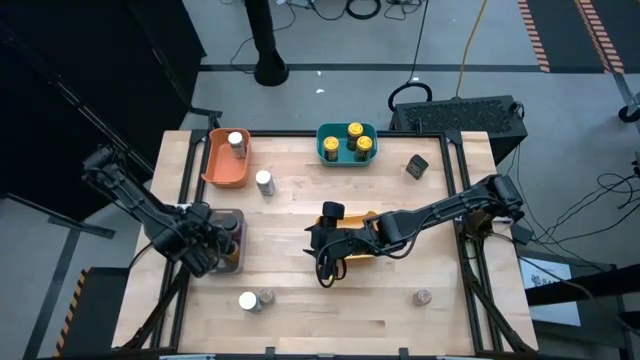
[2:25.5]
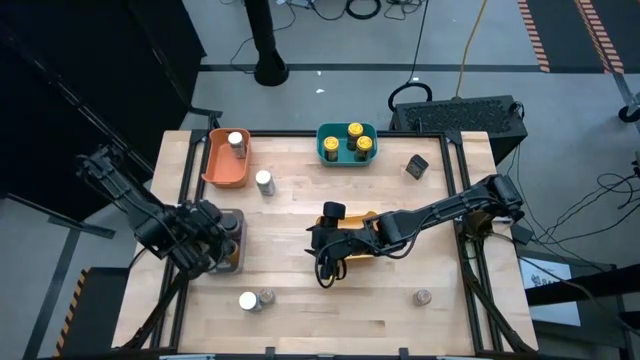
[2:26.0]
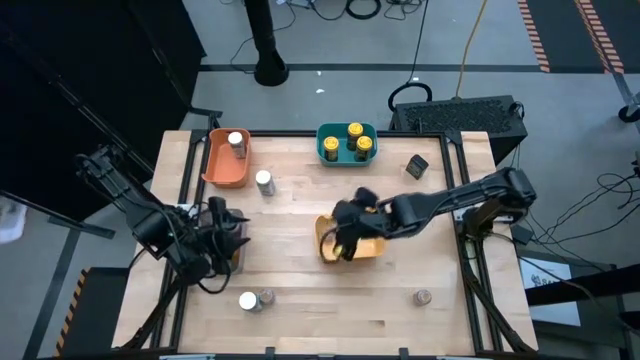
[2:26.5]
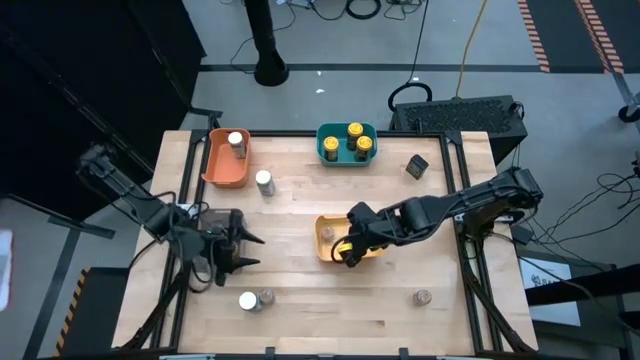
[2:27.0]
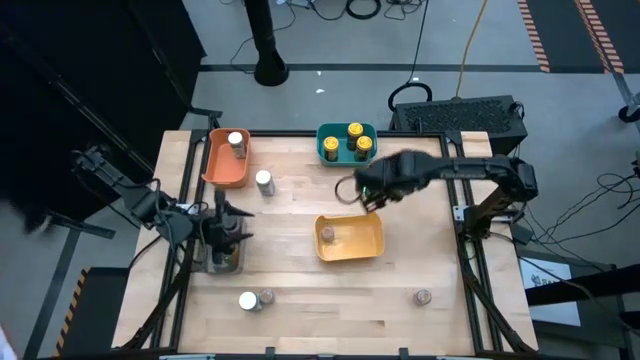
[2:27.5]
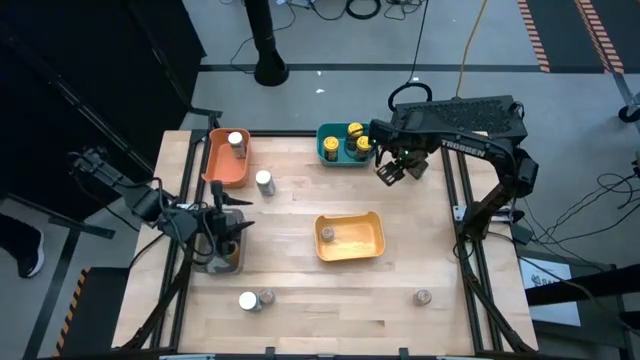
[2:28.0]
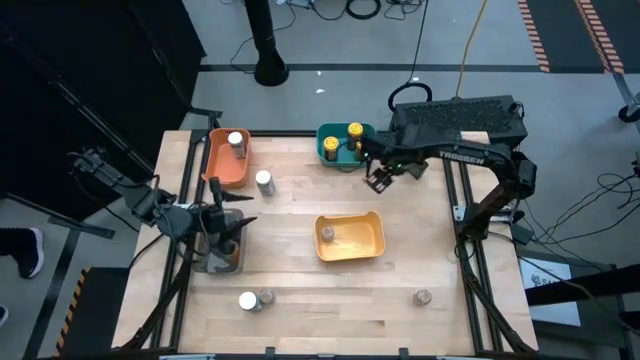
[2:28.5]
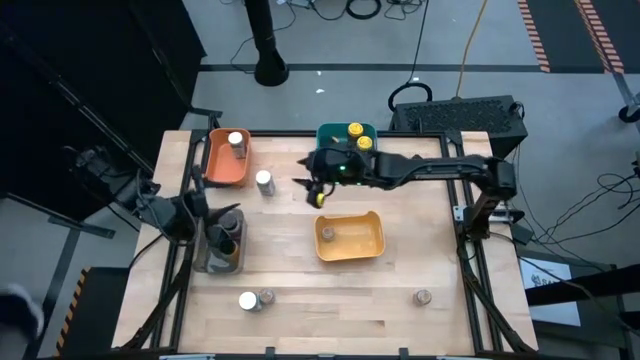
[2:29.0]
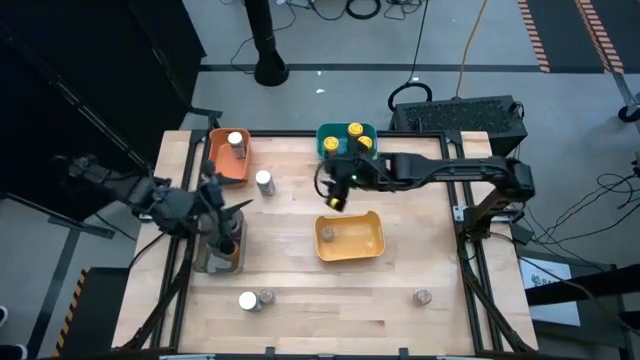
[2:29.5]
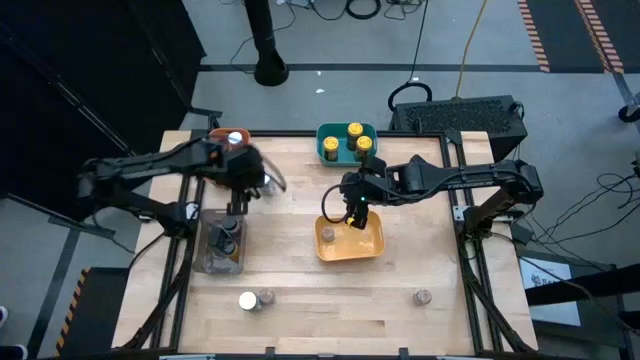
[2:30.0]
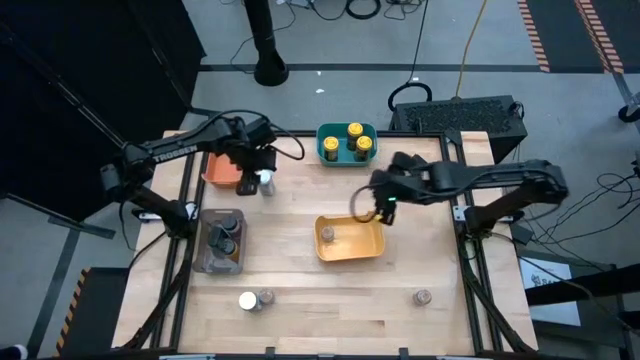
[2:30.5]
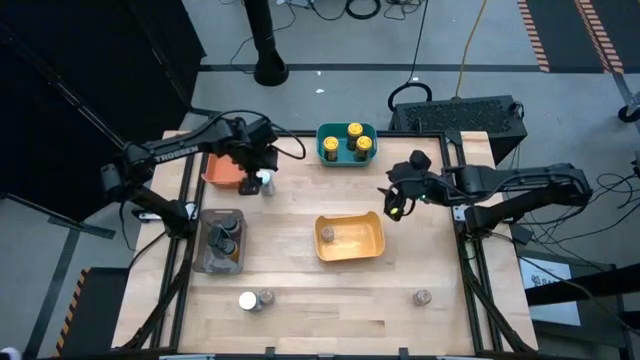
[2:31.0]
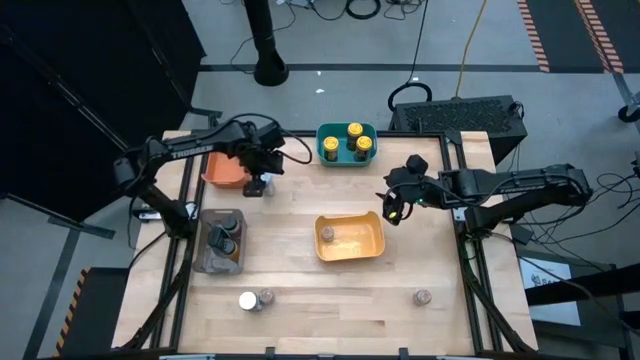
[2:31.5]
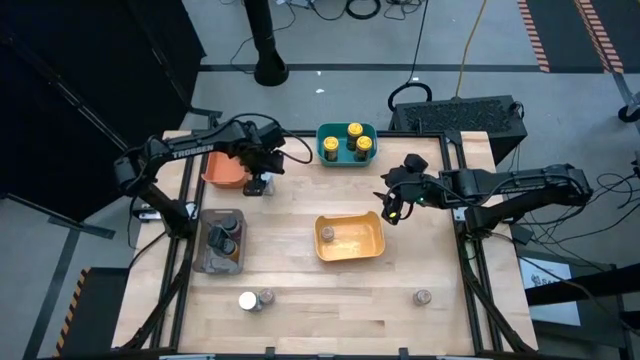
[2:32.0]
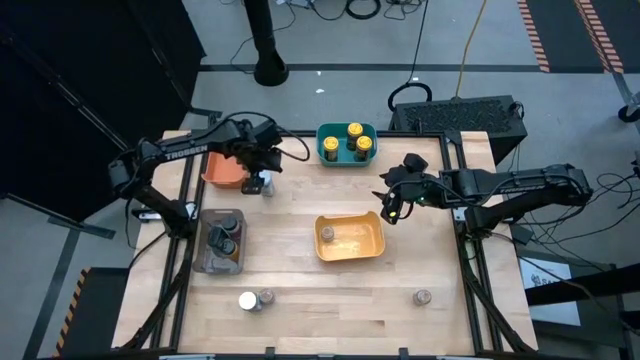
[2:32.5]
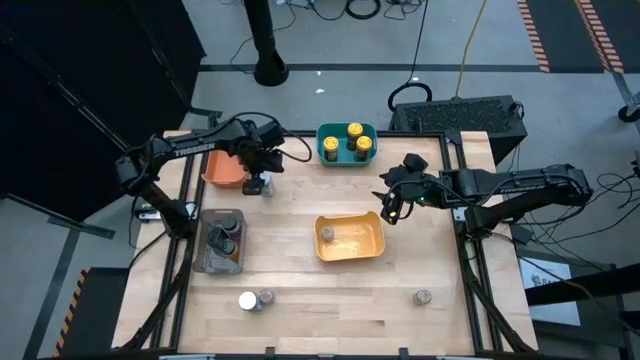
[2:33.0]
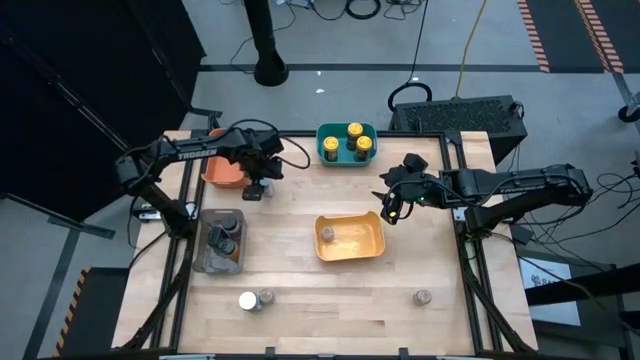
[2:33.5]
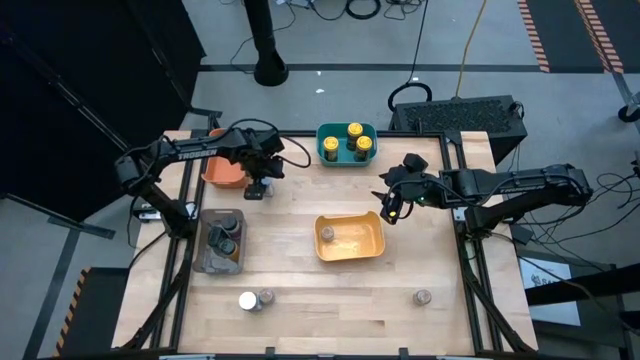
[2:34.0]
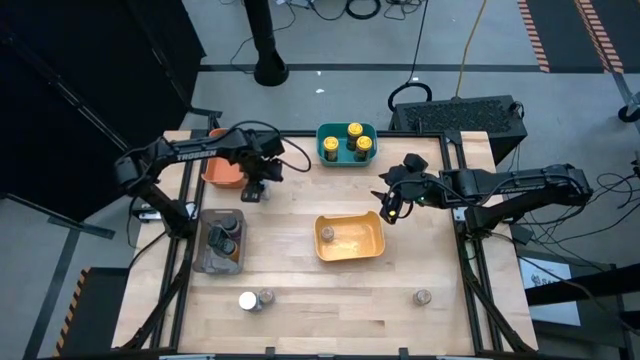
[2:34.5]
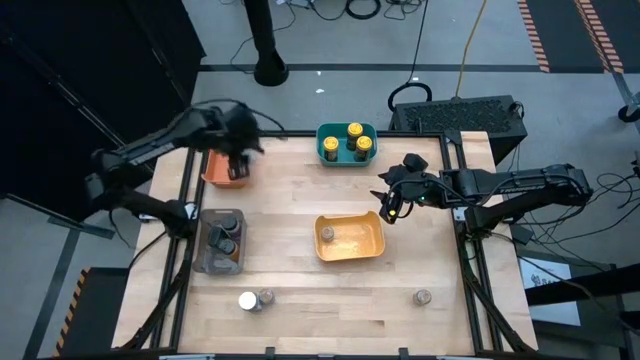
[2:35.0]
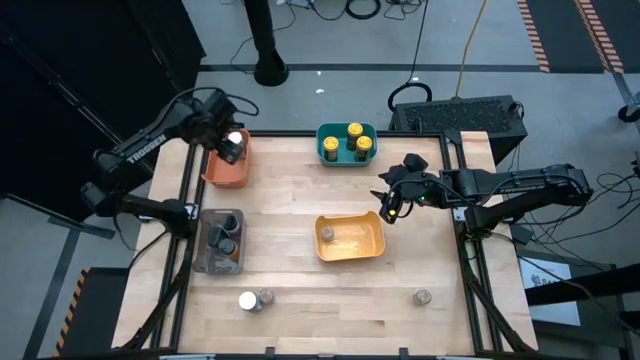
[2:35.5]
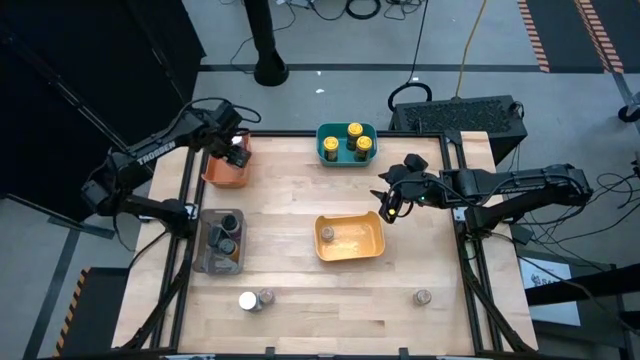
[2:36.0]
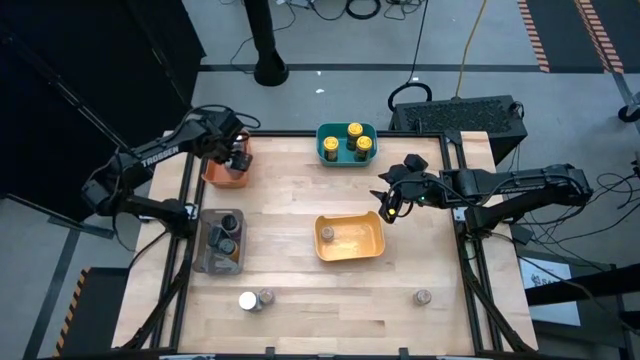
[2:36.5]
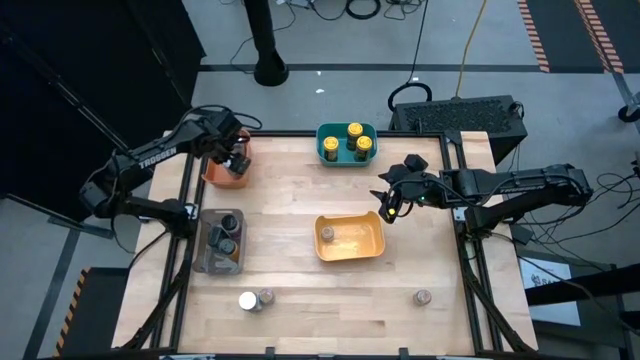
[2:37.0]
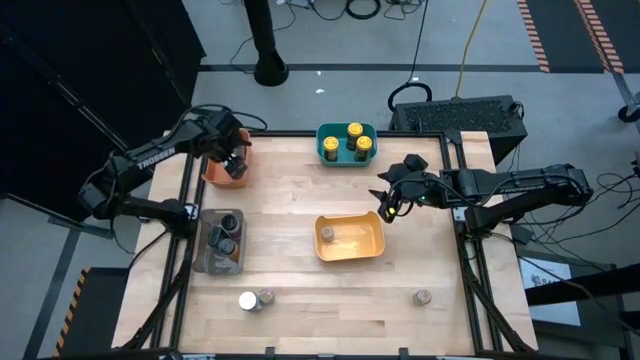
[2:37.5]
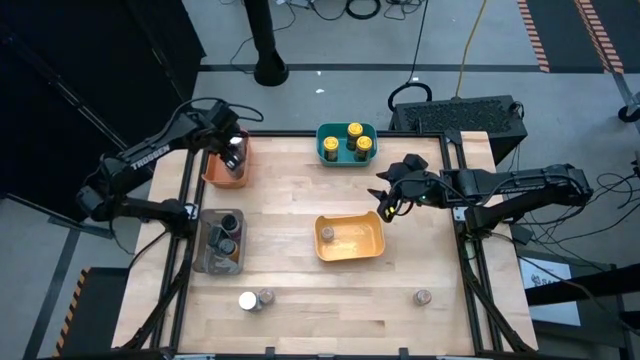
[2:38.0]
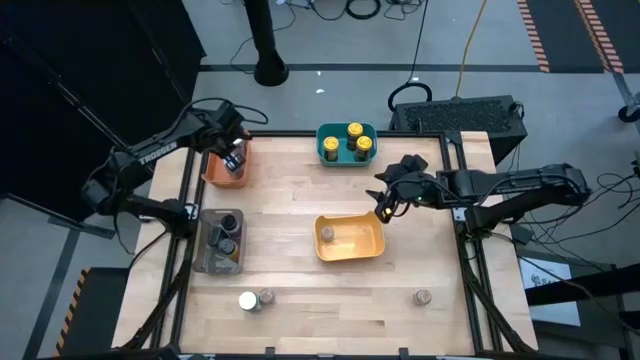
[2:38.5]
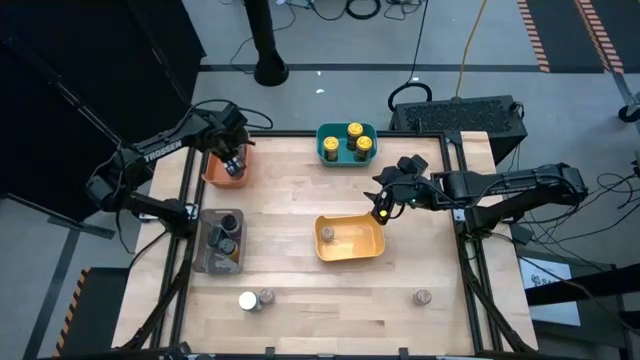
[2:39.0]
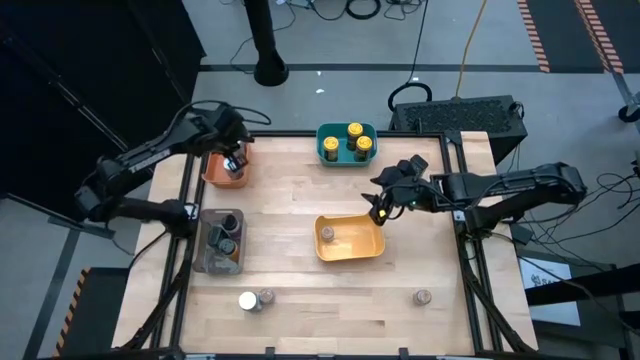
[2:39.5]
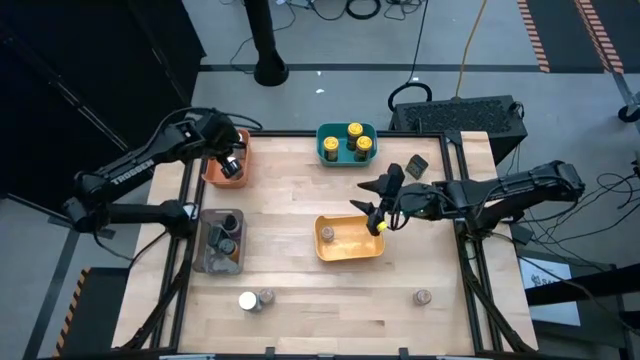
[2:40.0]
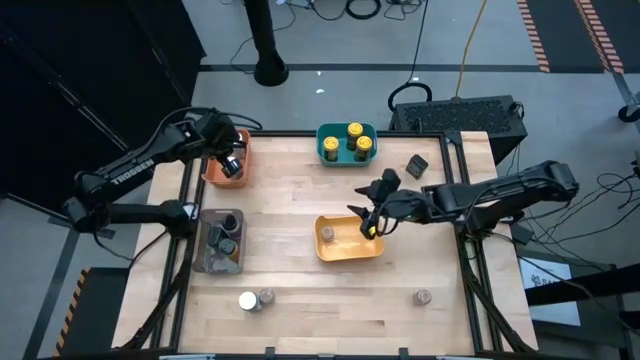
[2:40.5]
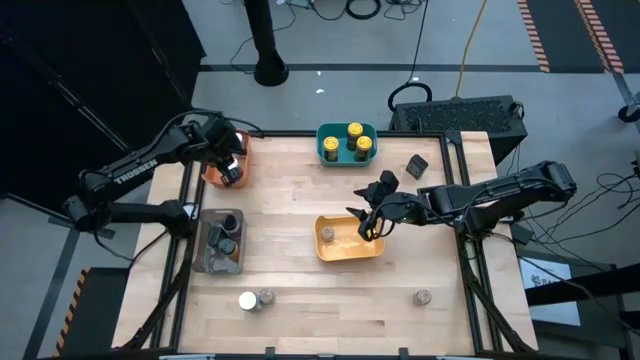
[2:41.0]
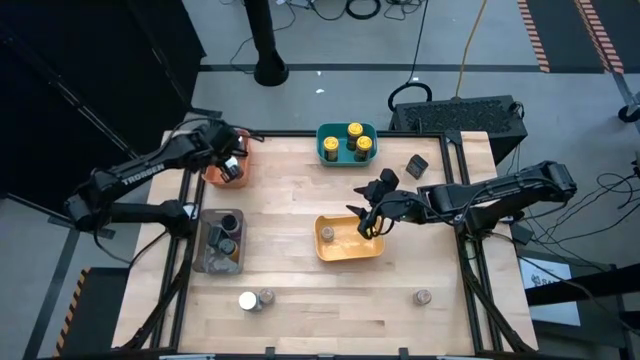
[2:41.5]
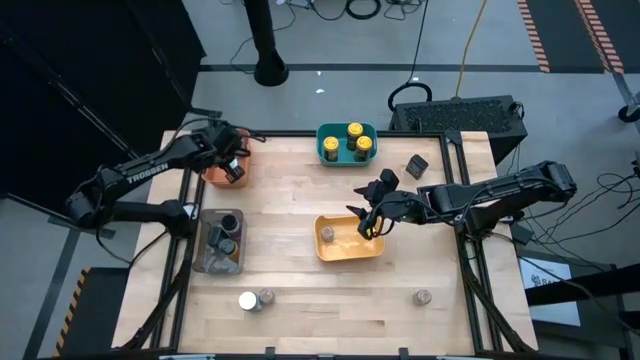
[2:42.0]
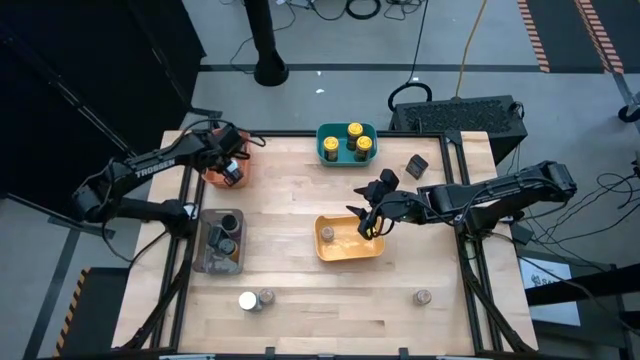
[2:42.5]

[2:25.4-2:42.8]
Task: Sort spices by type
Put the top white spice bottle into the orange bin

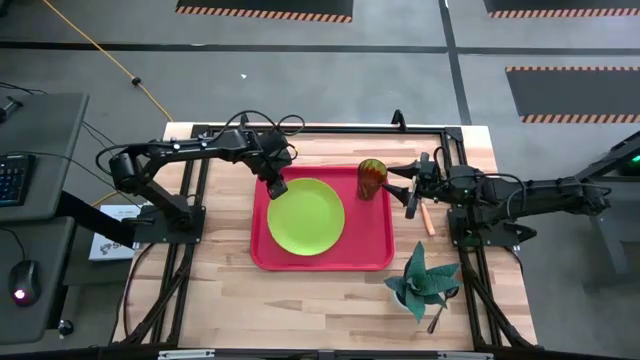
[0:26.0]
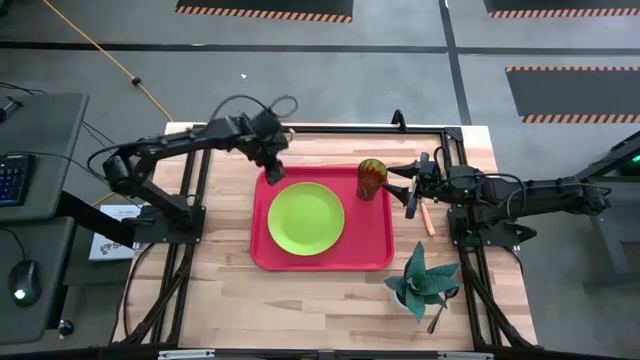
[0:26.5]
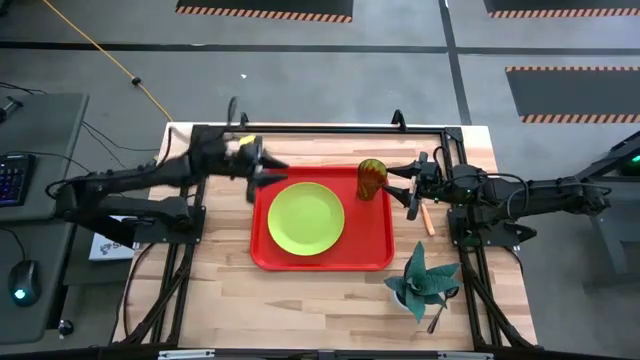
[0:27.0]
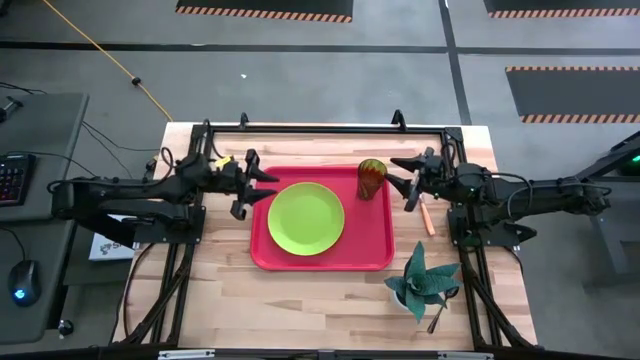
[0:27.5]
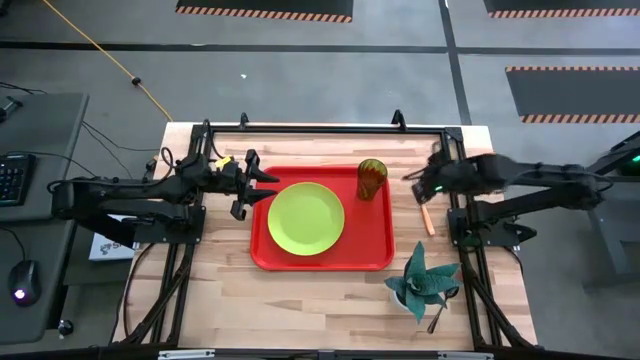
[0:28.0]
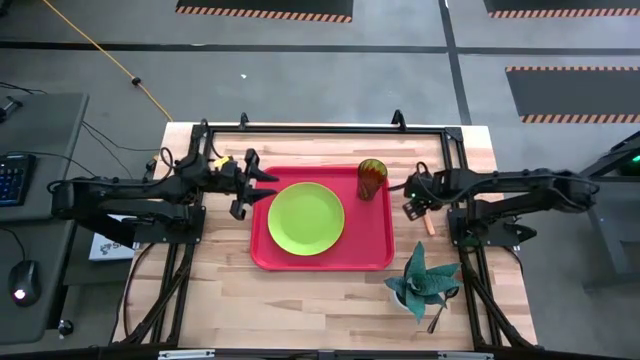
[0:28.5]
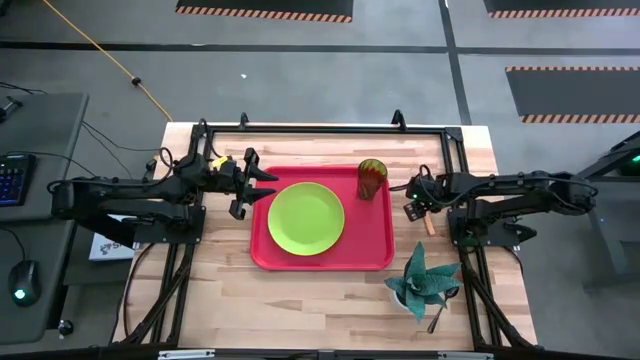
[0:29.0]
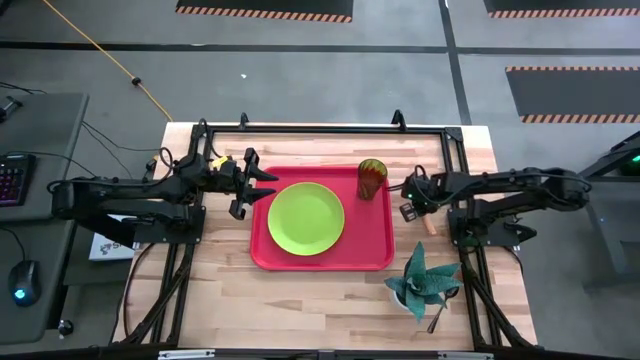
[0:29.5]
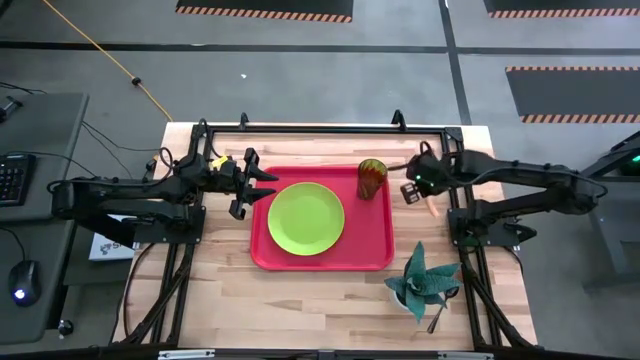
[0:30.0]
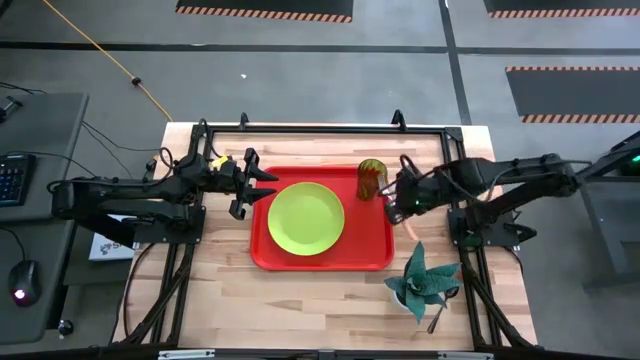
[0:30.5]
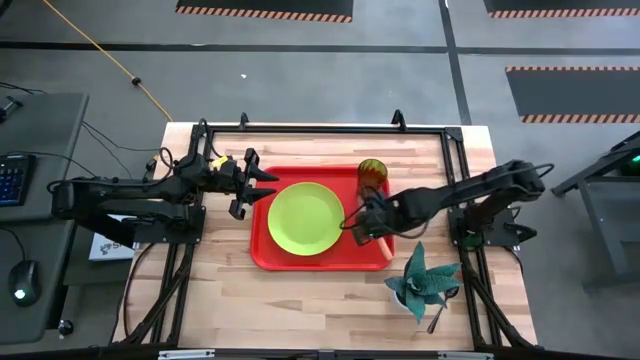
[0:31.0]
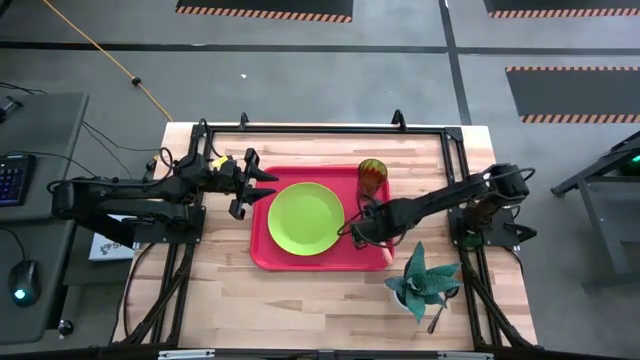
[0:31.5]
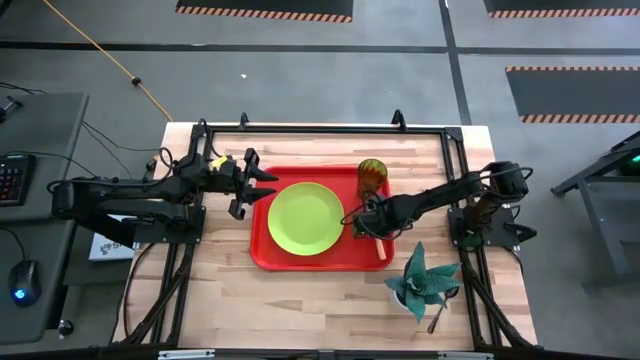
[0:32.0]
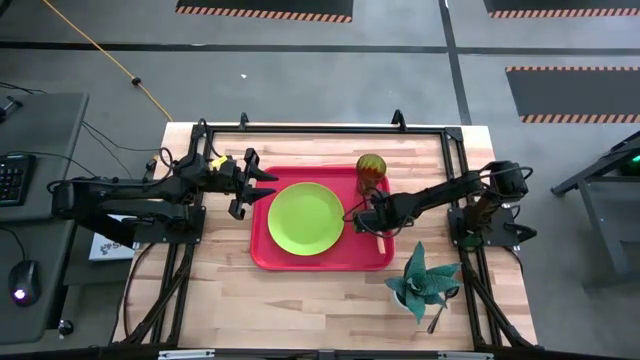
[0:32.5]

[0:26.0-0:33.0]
Task: Pick and place plate/cup/fork/spoon on tray
Put the orange fork on the red serving tray to the right of the green plate
